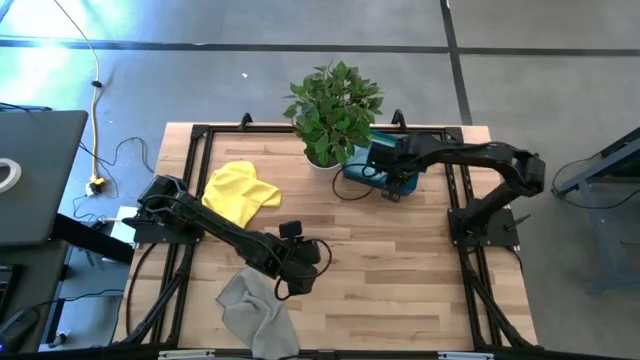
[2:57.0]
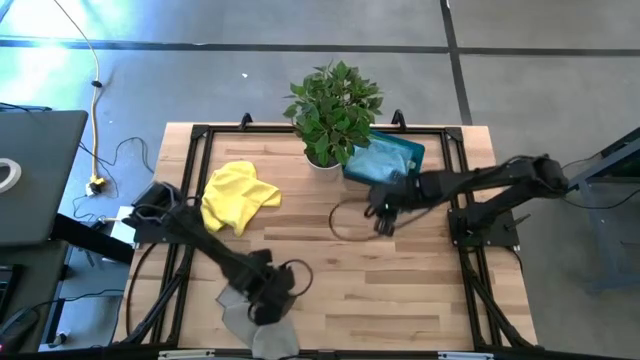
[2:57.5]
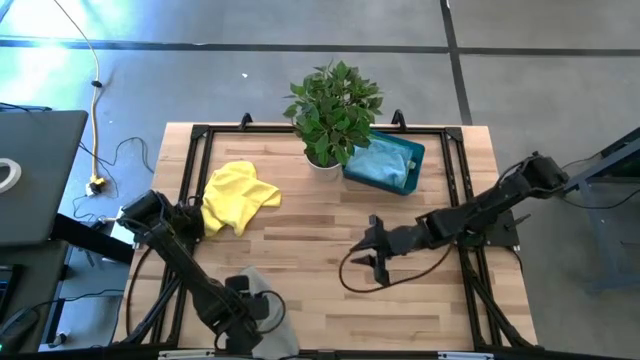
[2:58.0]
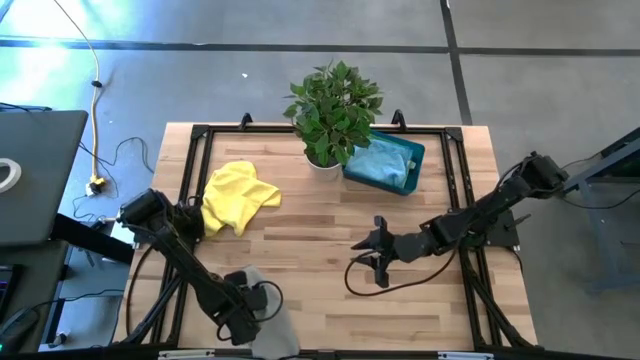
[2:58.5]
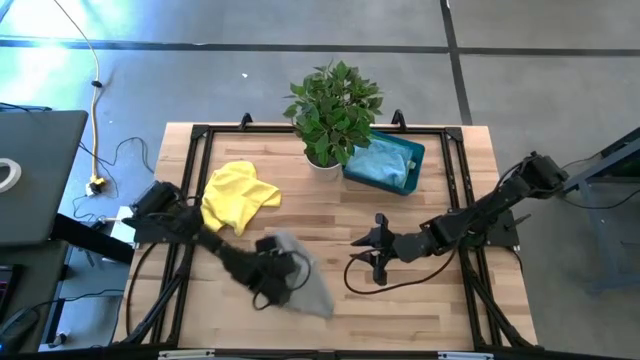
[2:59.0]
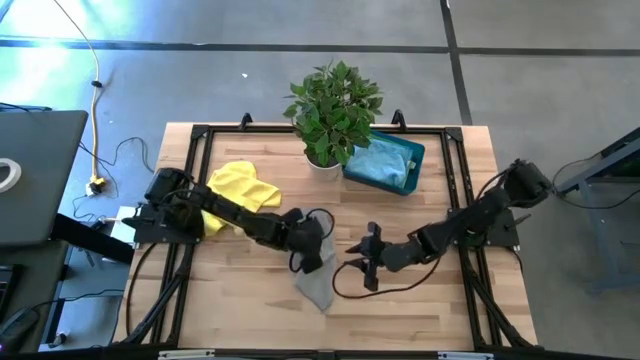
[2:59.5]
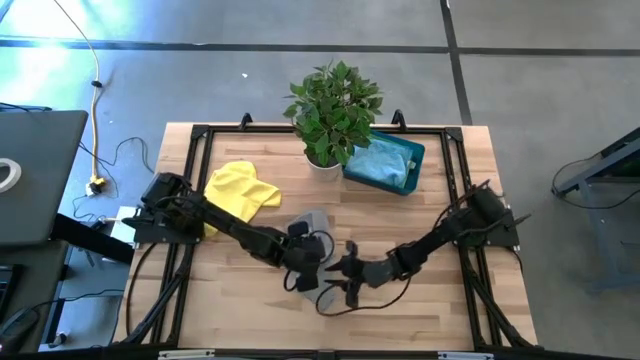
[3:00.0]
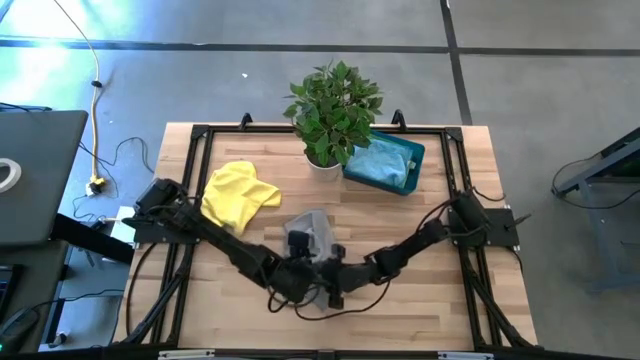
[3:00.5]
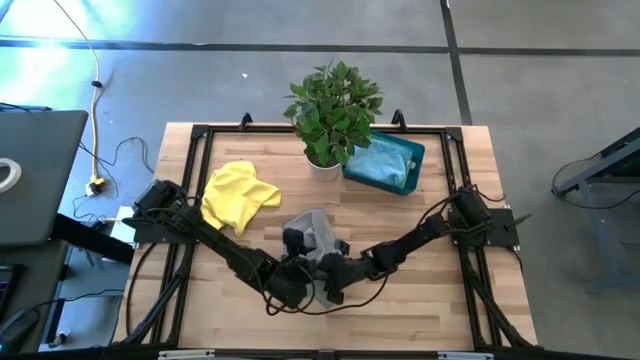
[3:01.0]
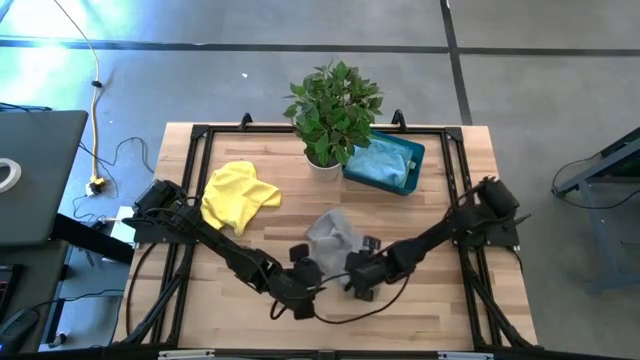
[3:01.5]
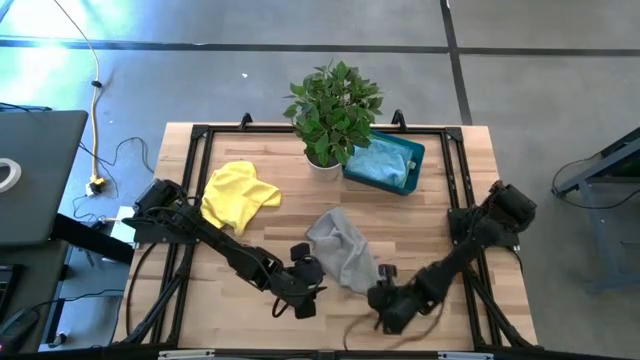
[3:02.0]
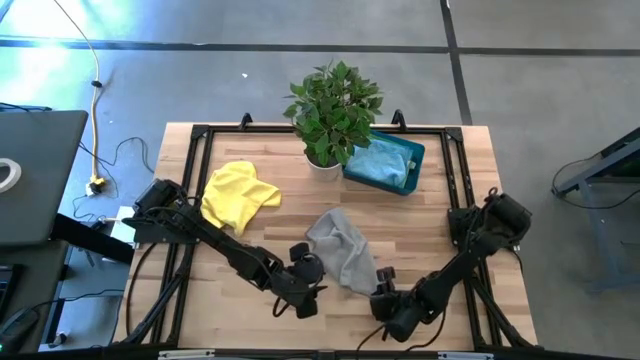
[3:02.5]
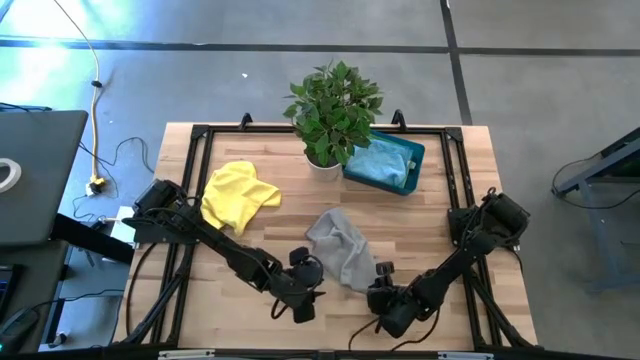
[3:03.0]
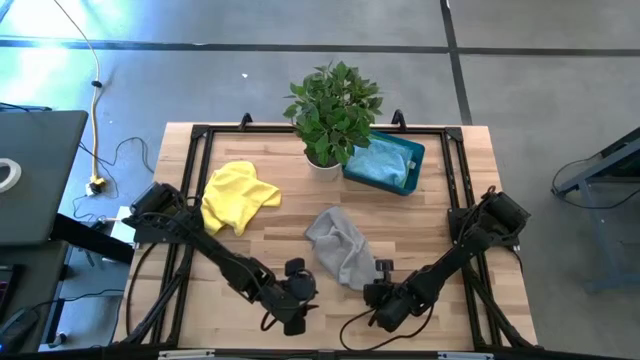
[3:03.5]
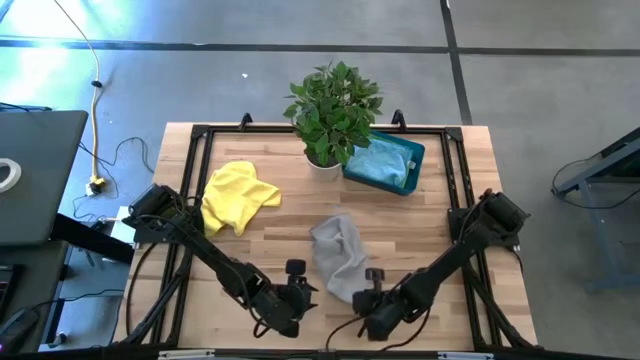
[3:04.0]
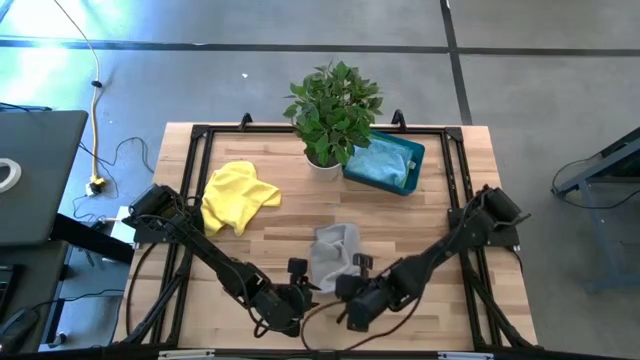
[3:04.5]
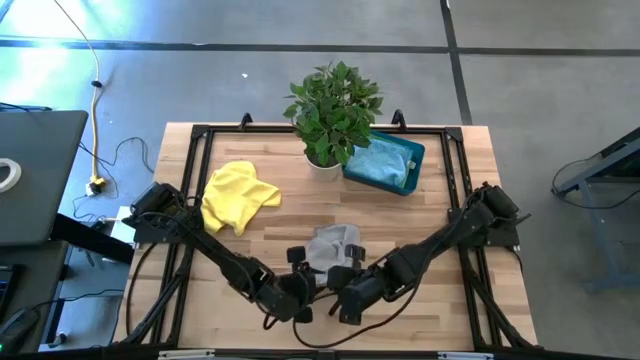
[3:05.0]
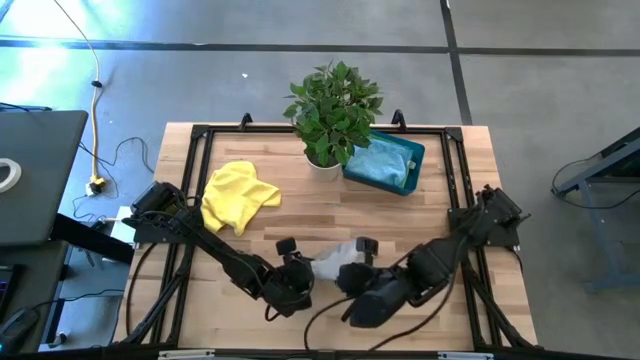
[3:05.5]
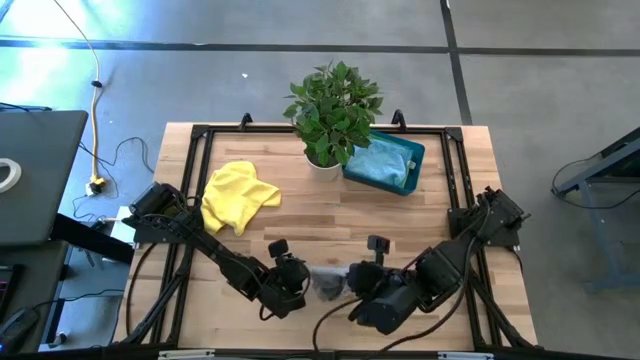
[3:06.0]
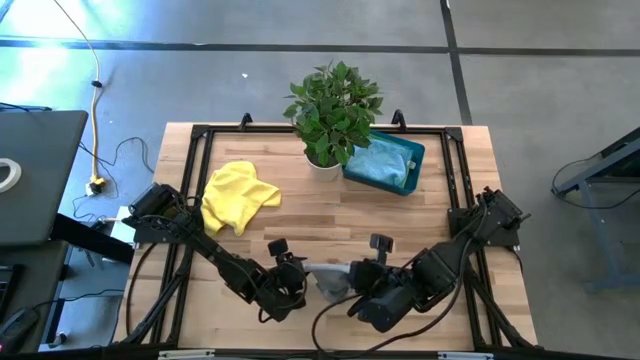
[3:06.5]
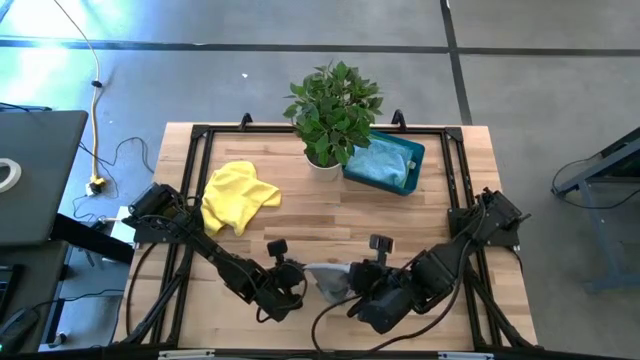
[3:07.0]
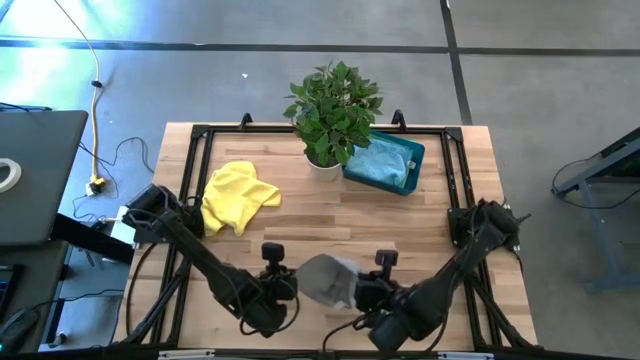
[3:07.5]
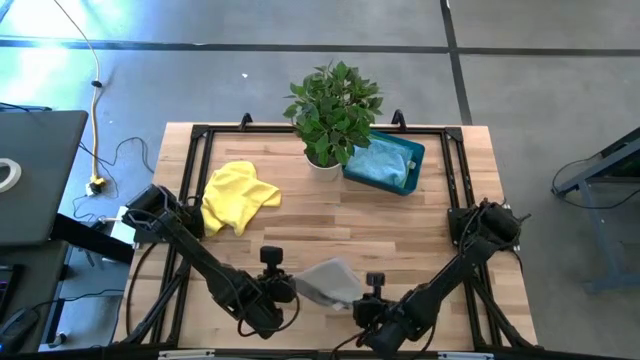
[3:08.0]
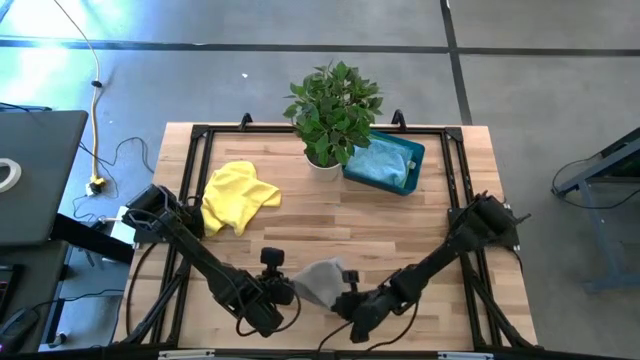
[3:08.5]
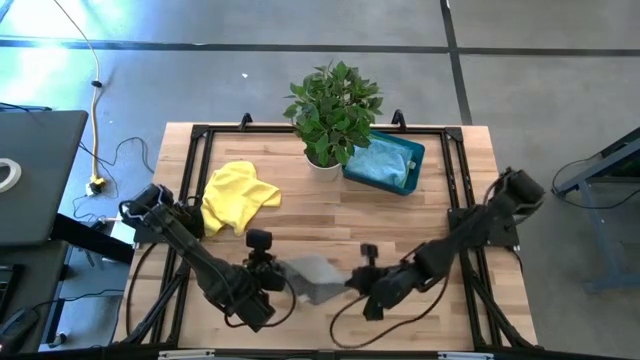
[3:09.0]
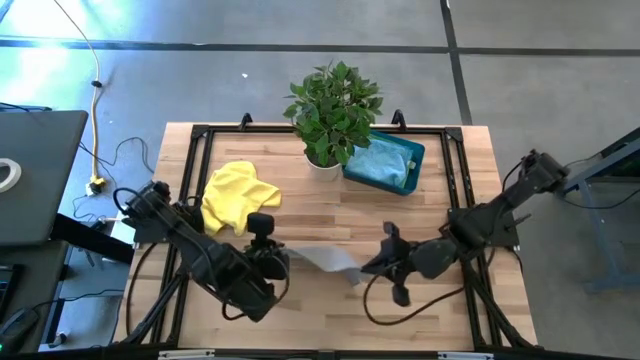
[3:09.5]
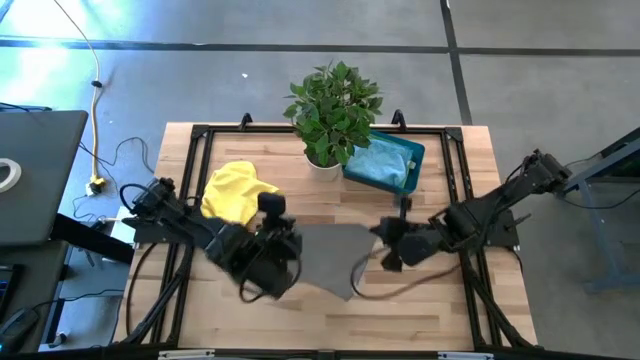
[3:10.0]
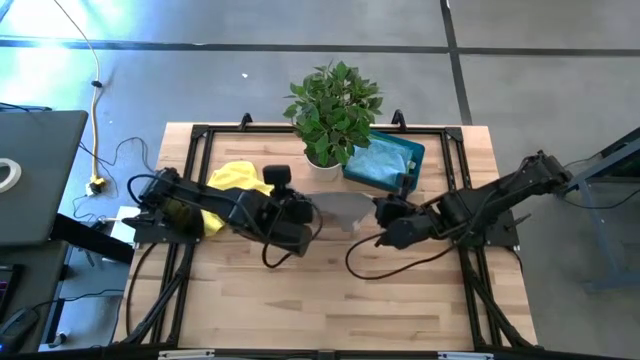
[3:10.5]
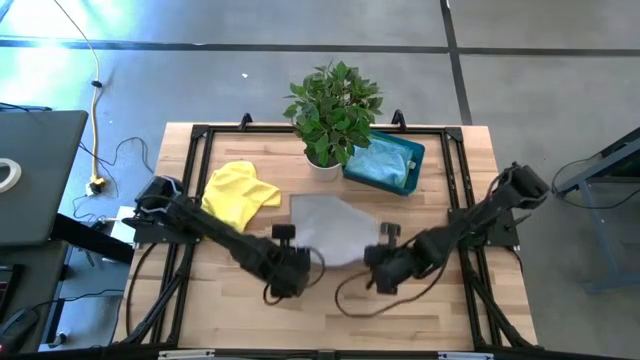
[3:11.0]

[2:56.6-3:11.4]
Task: Fold microfiber towels
Fold the gray towel

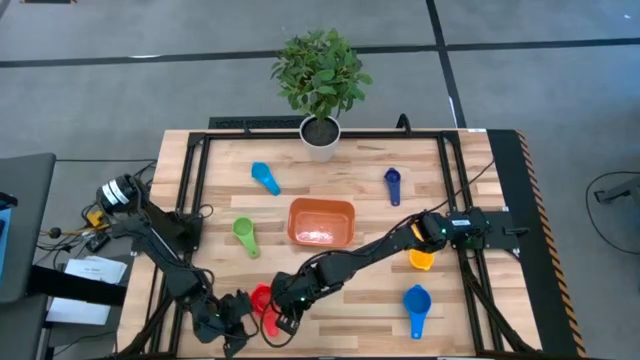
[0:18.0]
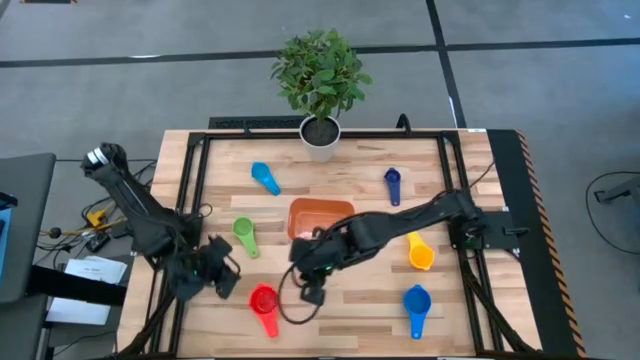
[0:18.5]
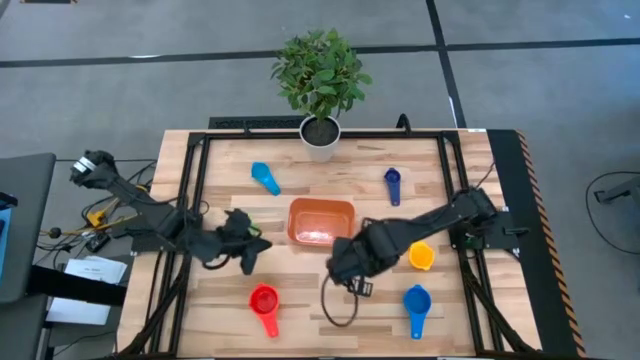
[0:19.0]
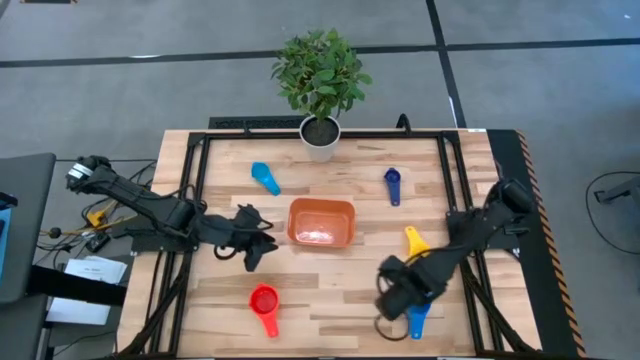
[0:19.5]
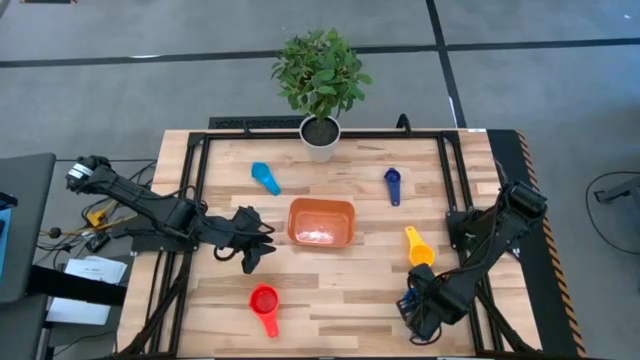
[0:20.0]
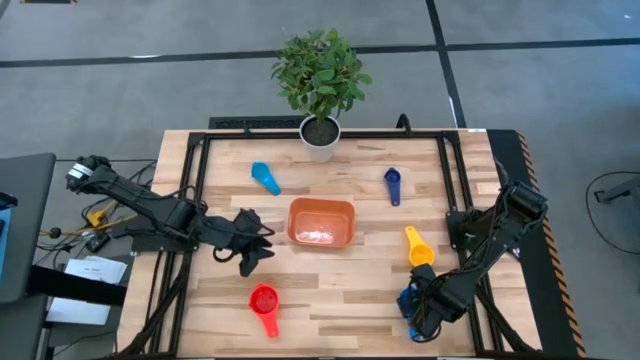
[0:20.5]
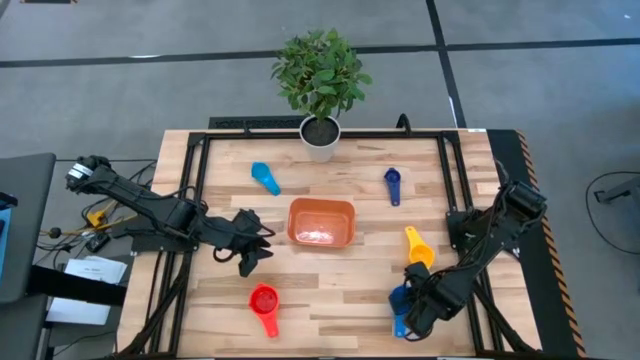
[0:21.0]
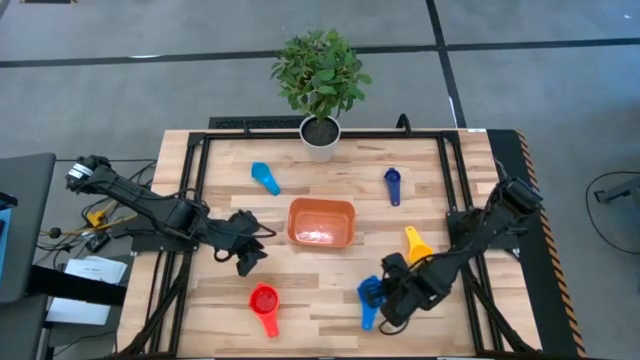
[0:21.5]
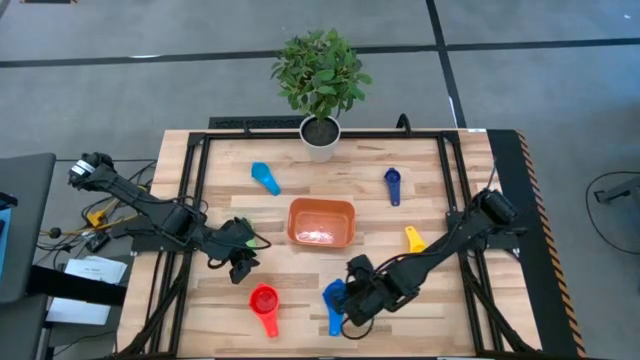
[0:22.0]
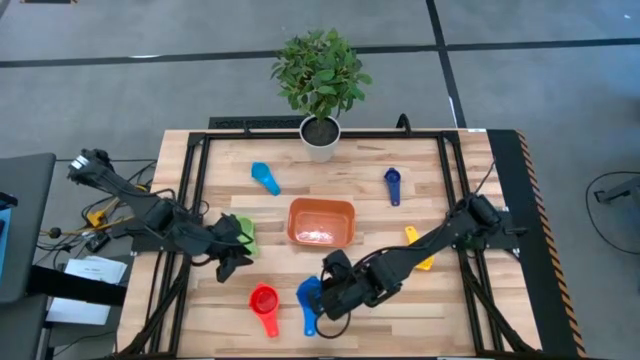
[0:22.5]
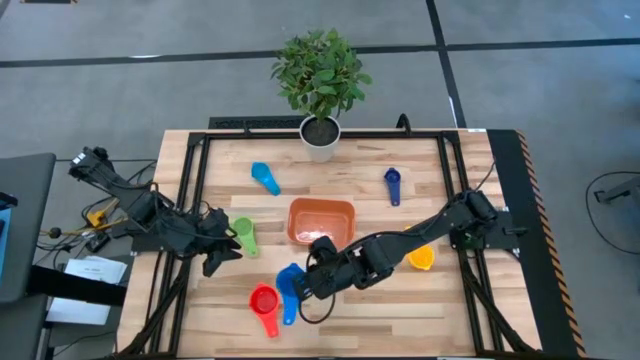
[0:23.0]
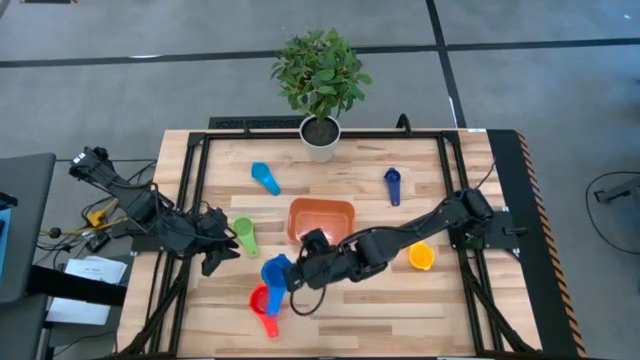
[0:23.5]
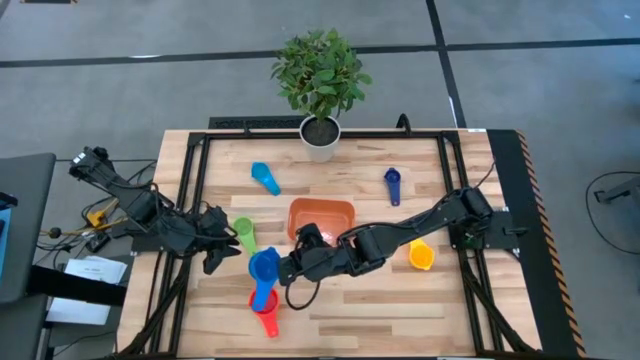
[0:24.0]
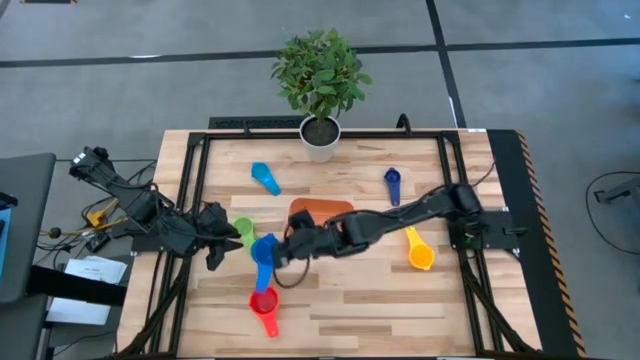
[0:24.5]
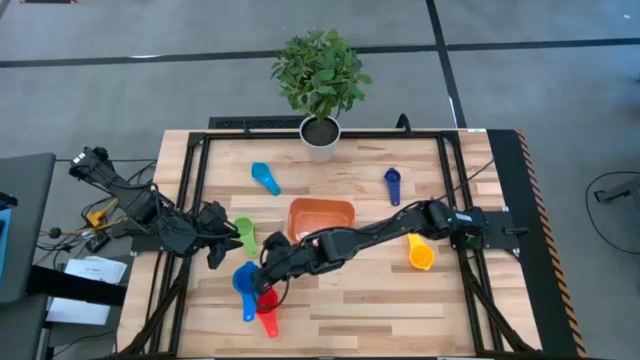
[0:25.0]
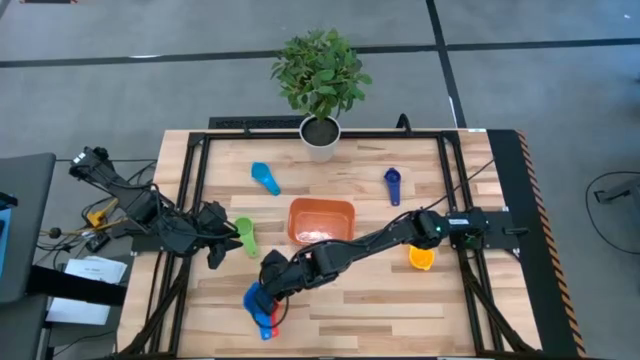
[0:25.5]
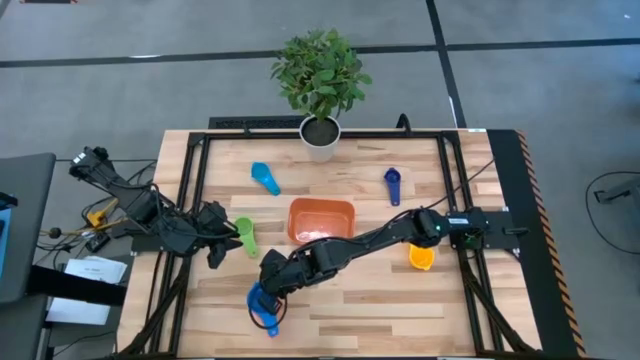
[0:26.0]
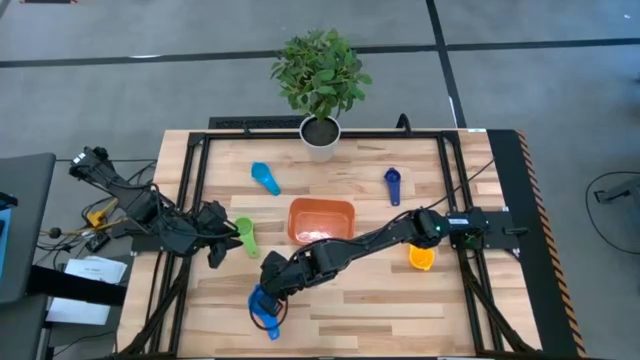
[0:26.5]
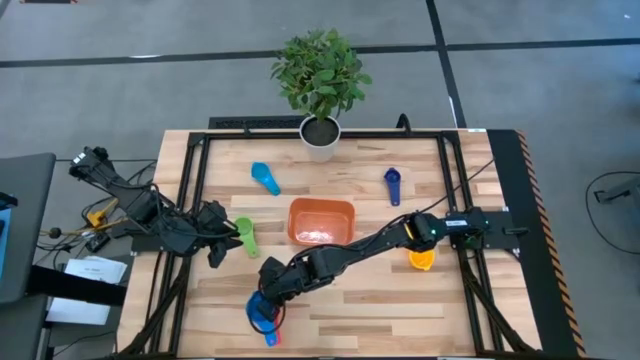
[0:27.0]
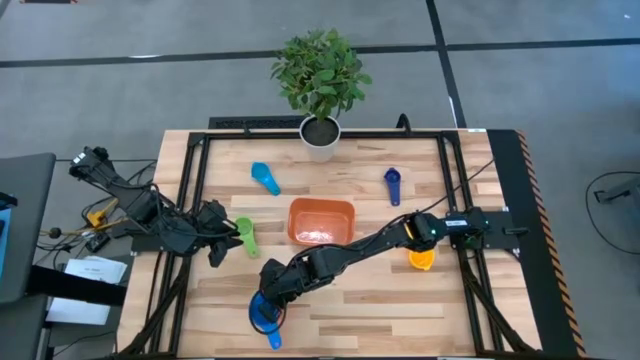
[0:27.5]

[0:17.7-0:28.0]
Task: Nest measuring cups in basket
Stack the blue measuring cup on top of the red measuring cup
